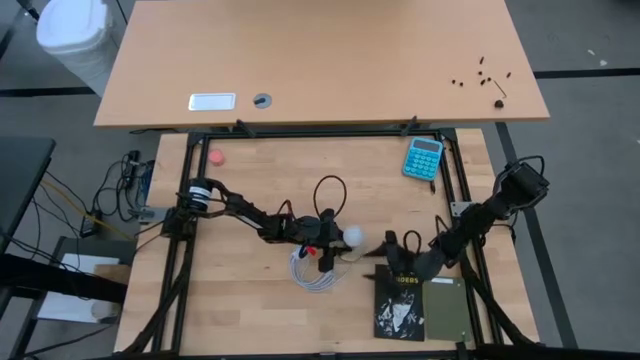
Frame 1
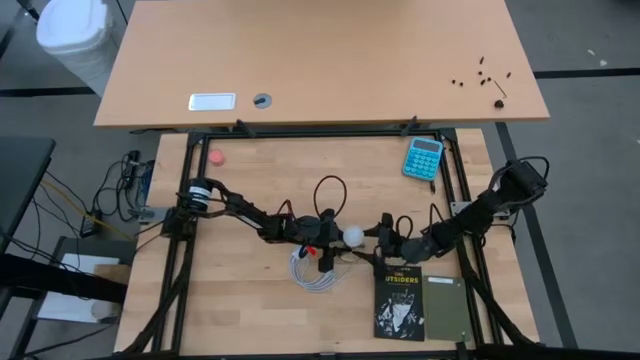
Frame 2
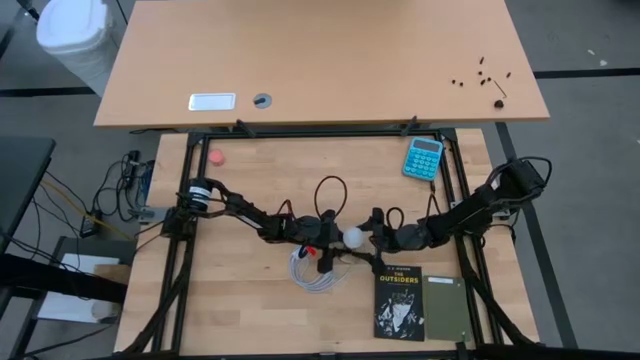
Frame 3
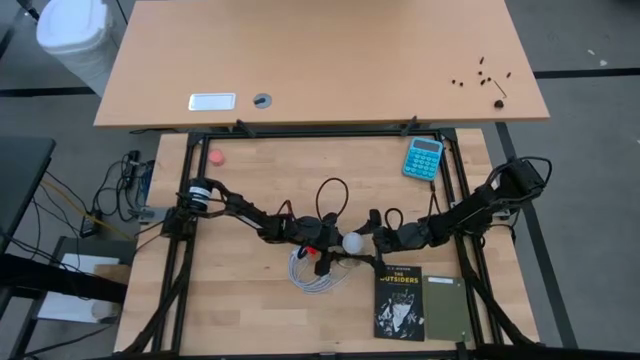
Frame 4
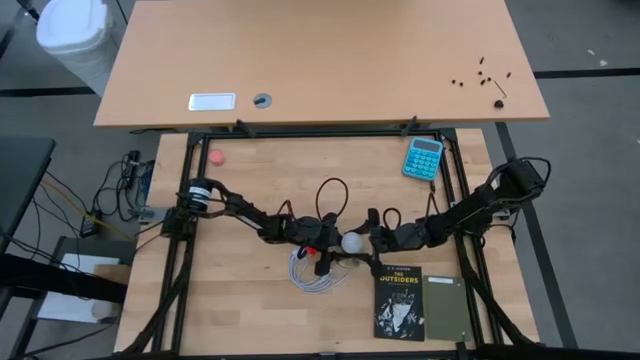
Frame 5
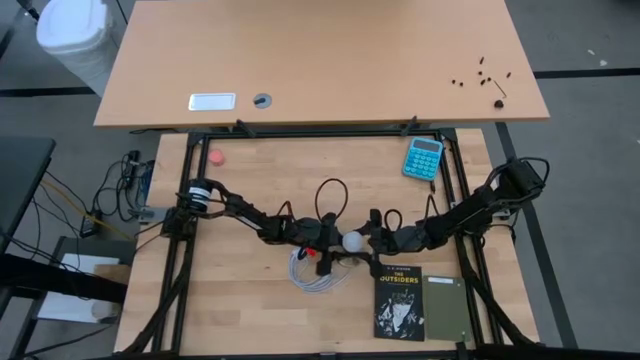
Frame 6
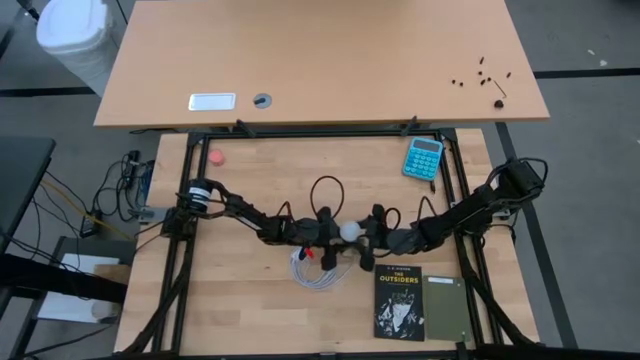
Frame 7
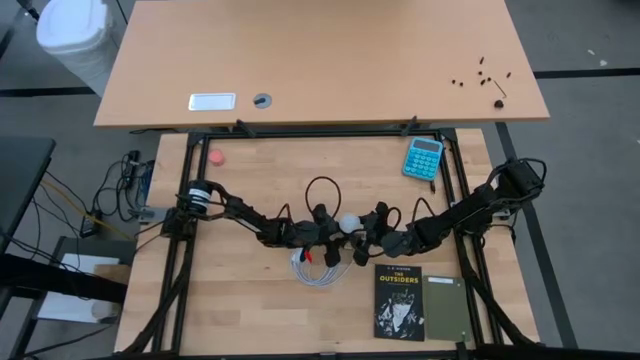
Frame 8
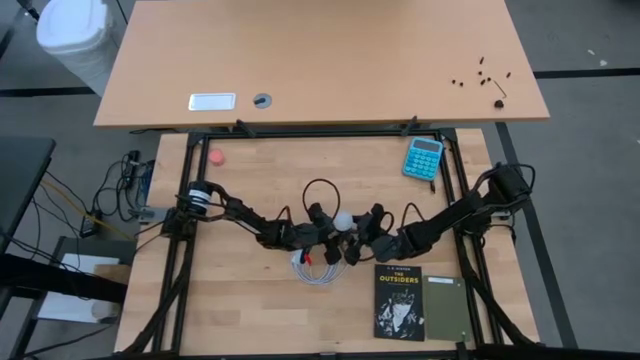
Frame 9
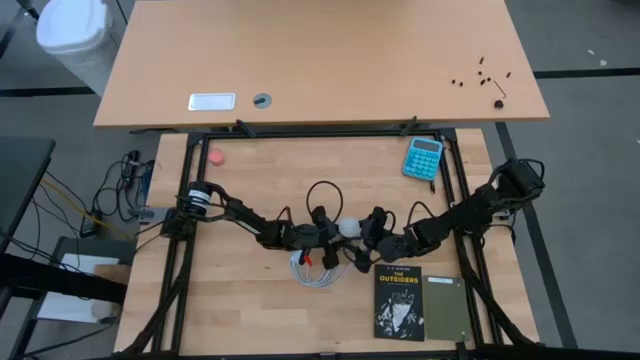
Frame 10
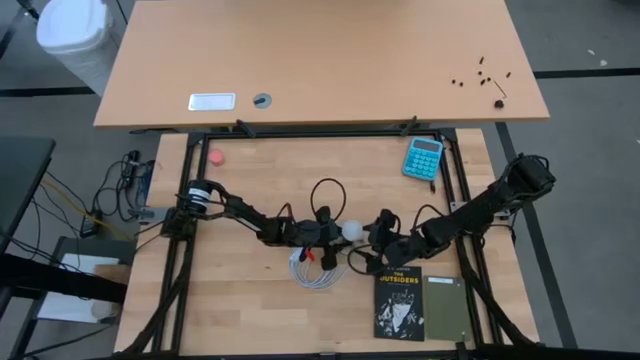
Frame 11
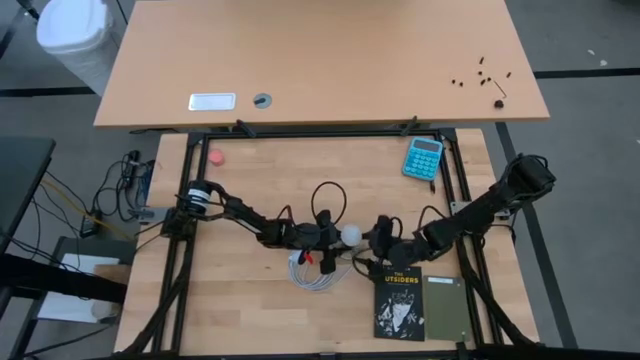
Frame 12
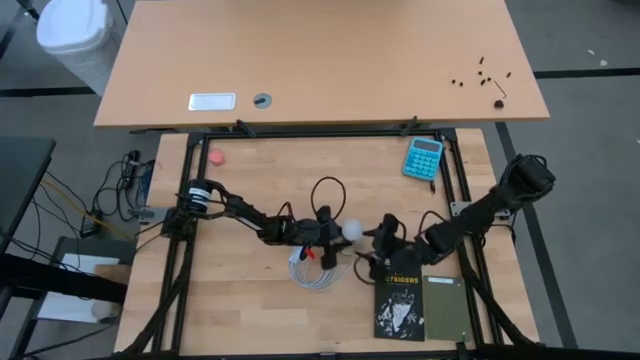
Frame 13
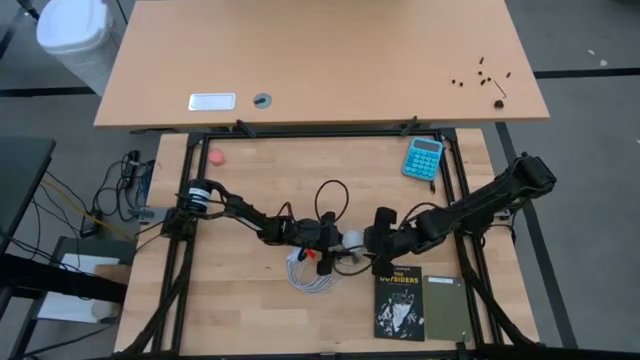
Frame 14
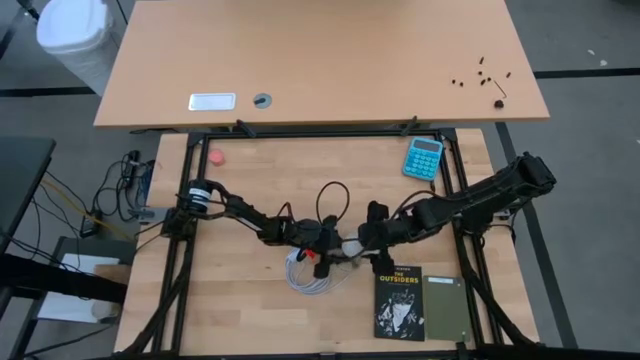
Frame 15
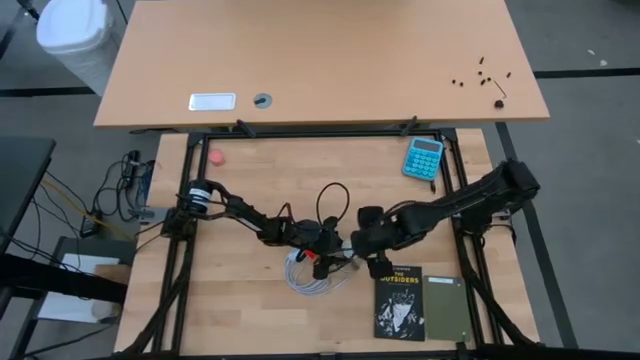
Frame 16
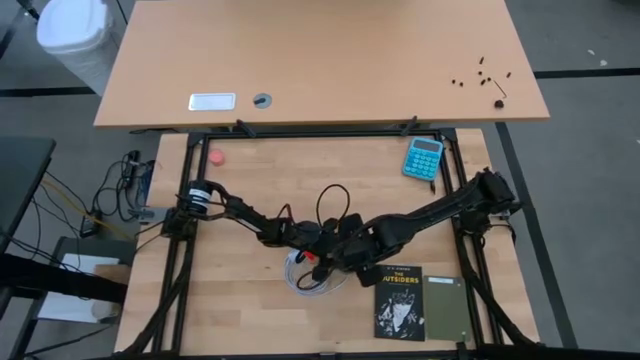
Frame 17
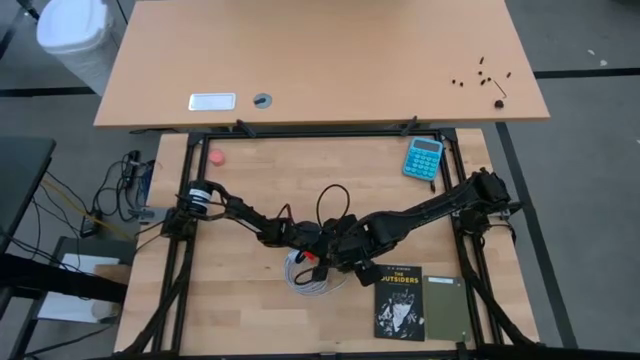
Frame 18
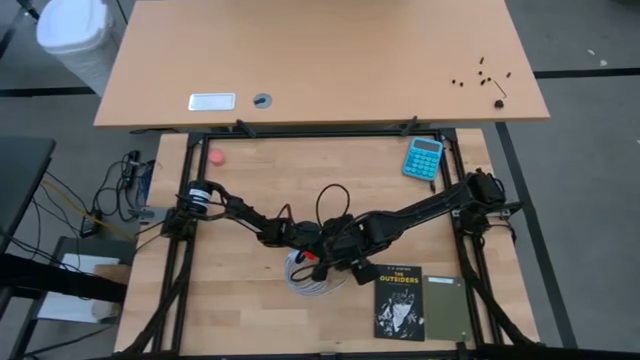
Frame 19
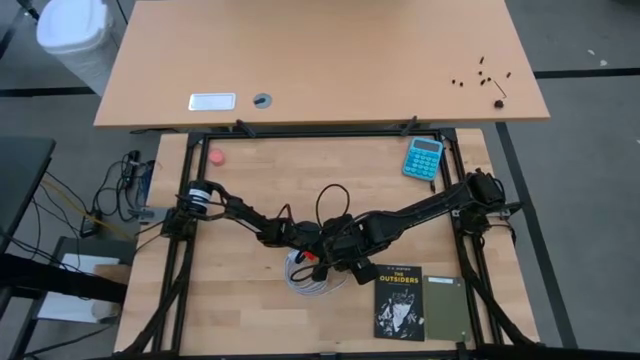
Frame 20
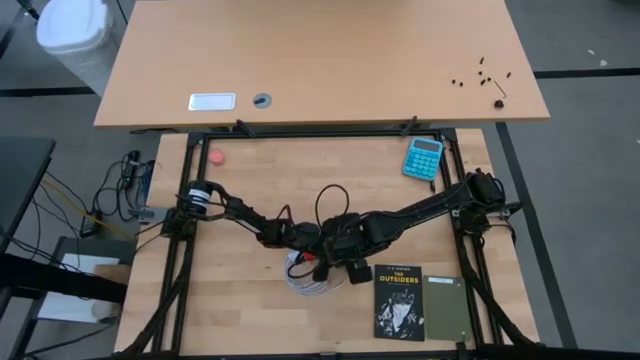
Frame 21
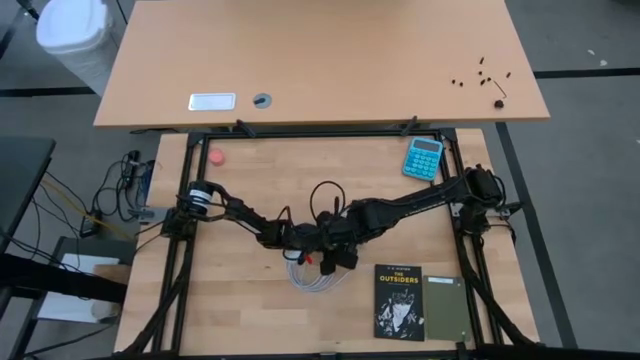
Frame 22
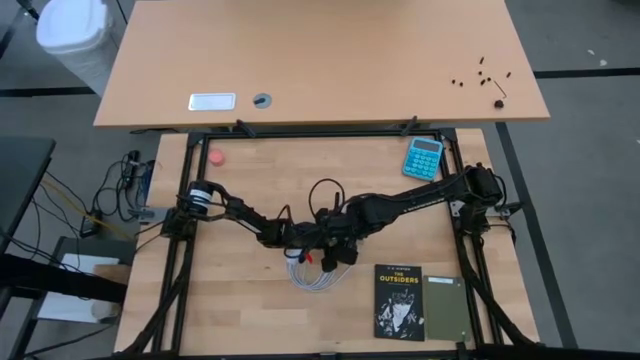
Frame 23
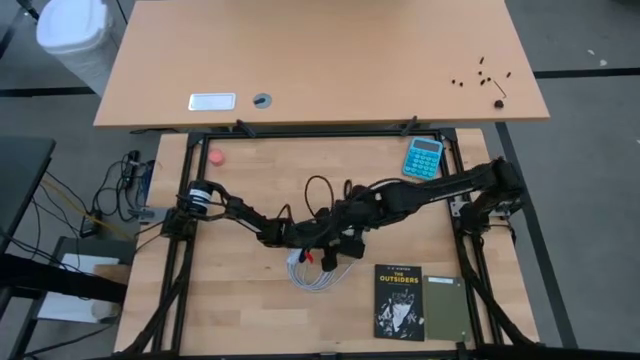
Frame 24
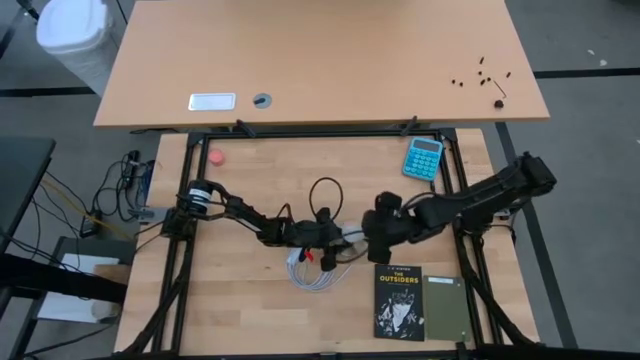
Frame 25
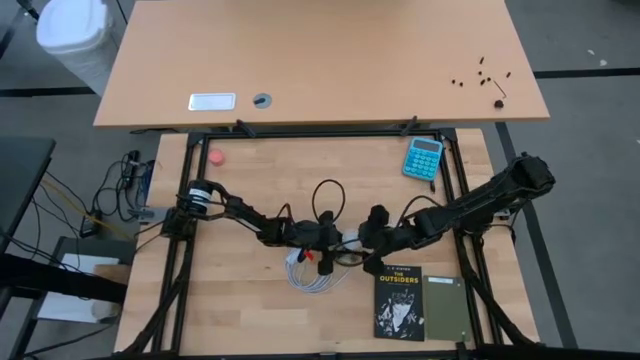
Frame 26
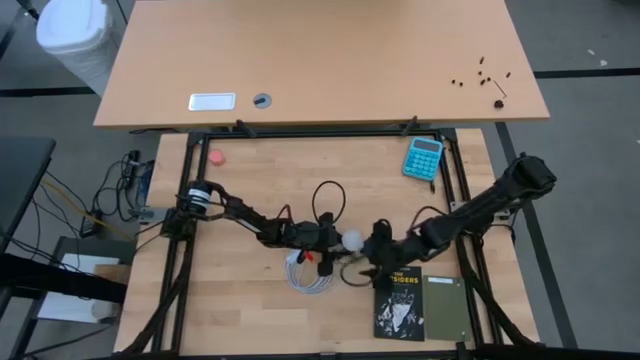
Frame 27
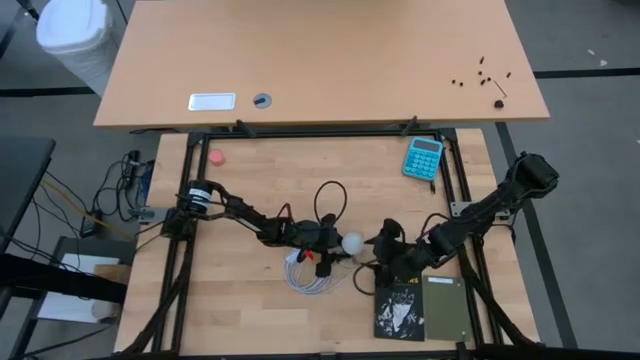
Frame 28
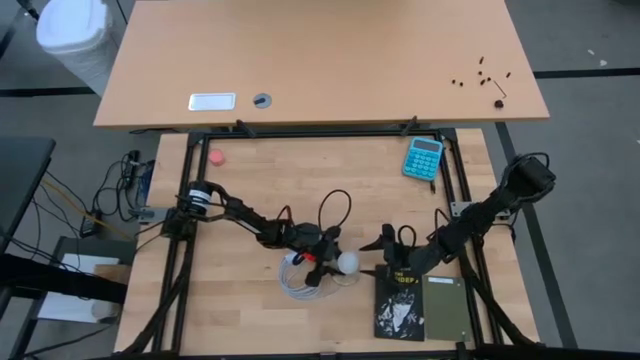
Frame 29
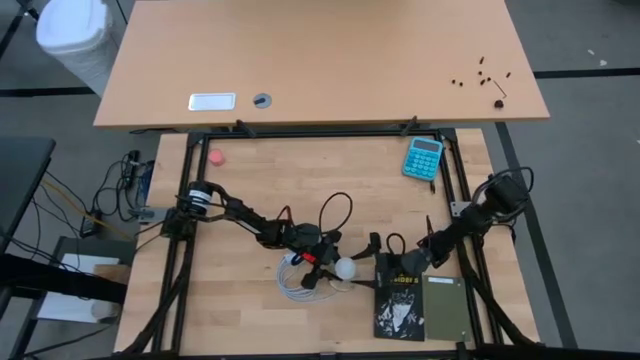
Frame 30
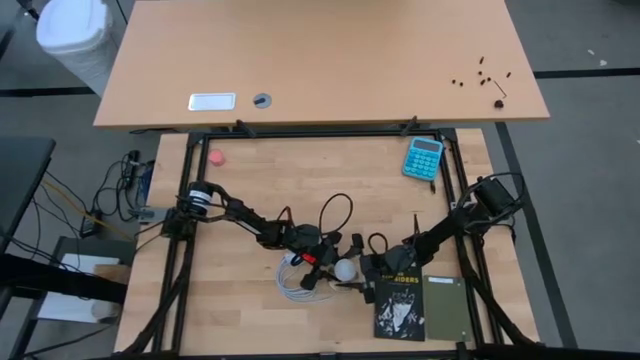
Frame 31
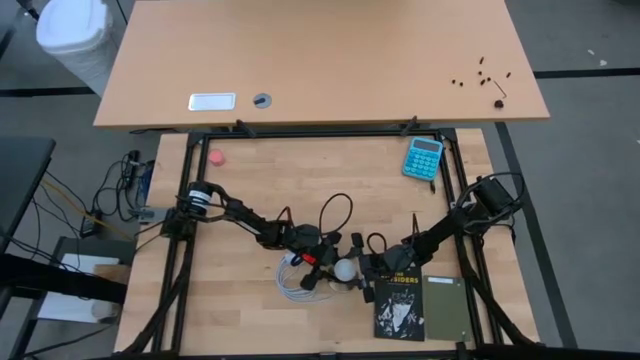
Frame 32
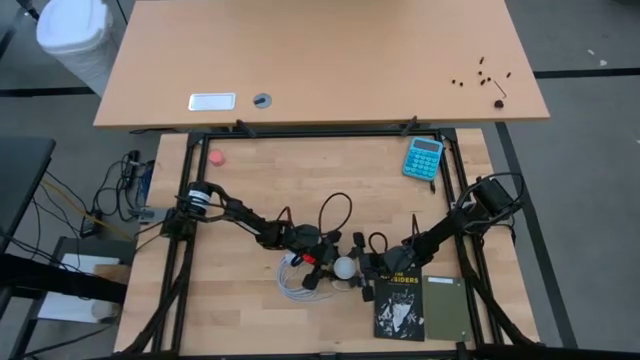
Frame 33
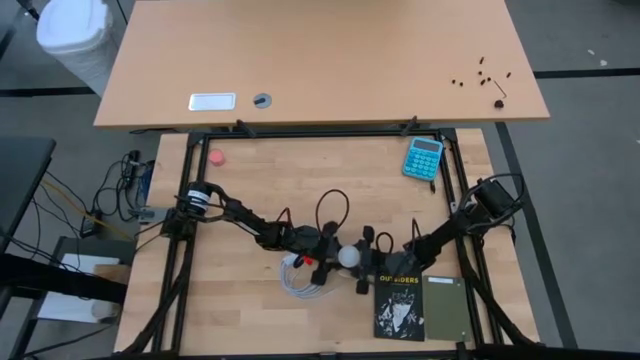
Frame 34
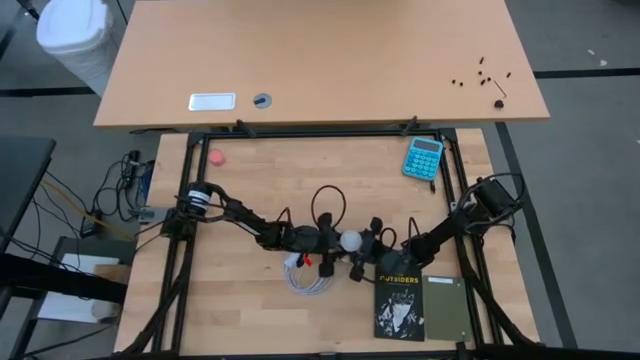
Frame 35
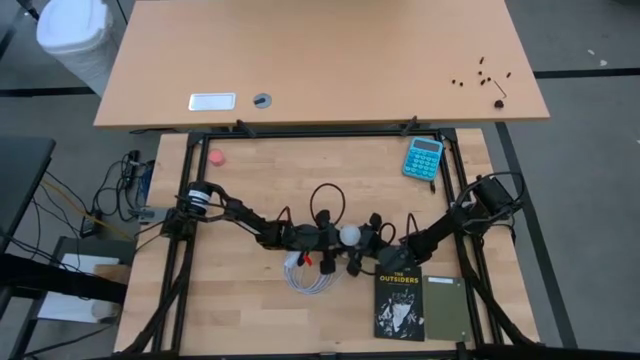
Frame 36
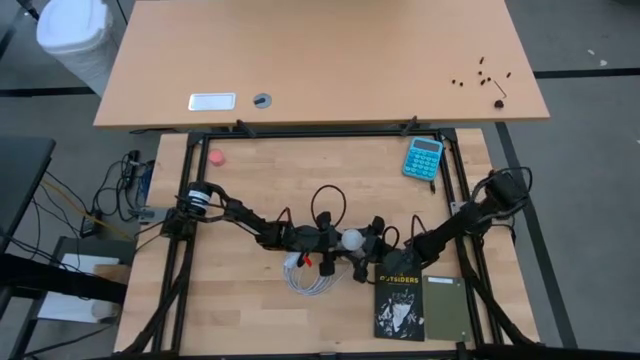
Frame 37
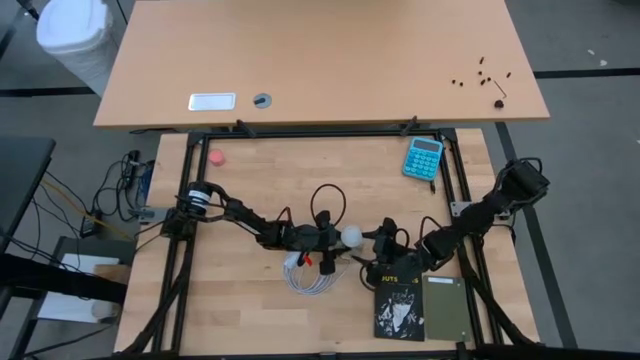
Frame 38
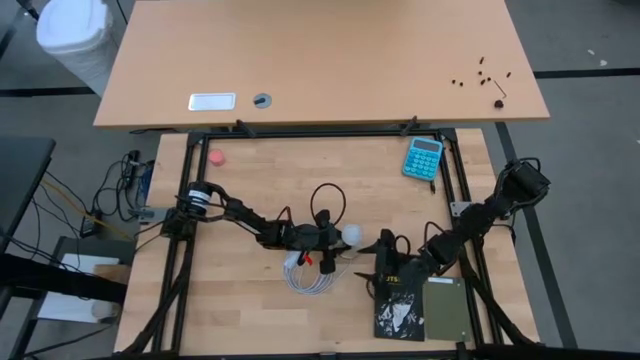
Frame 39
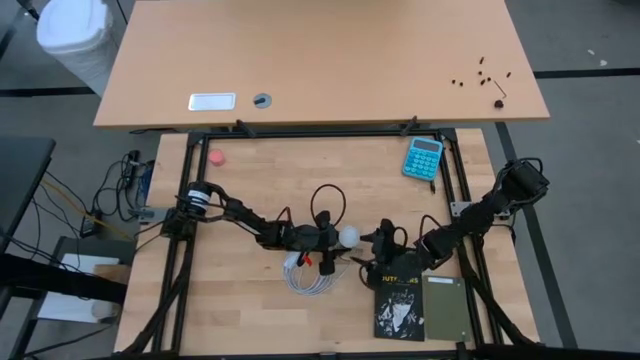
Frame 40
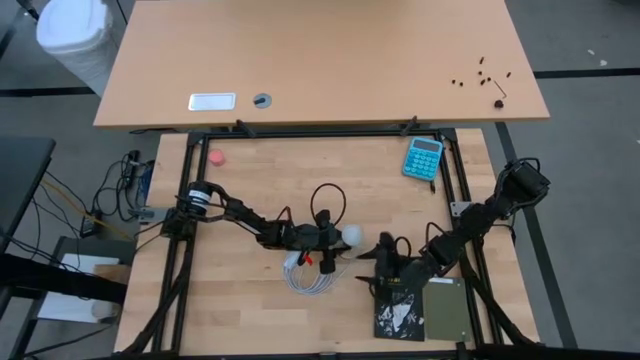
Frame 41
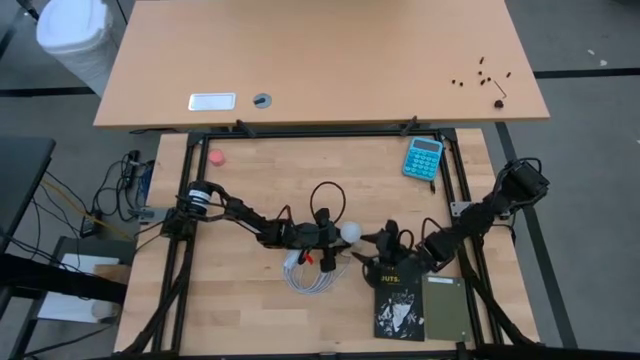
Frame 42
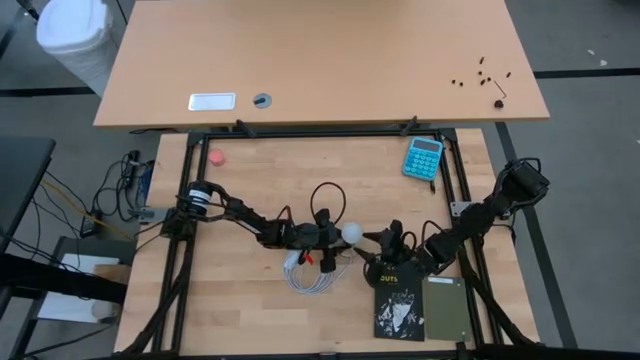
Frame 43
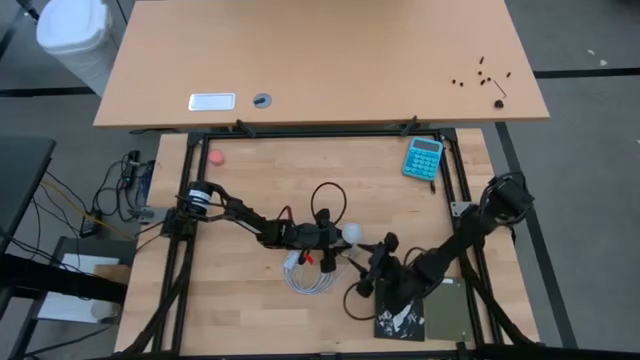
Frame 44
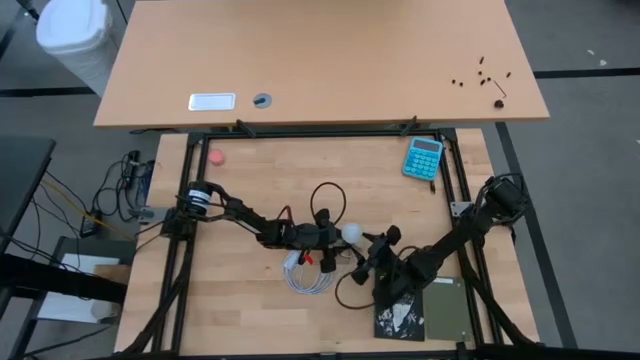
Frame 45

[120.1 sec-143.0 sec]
Task: Screw lightbulb
Insert the white lightbulb into the silver lamp
